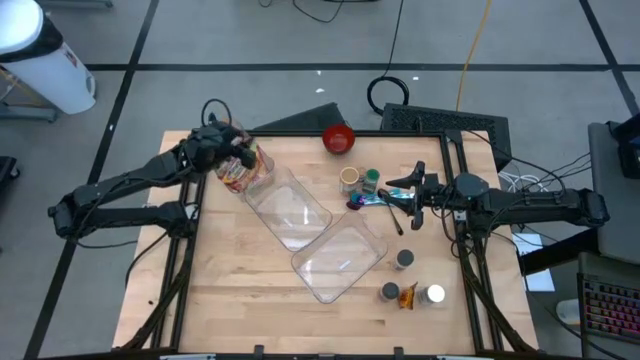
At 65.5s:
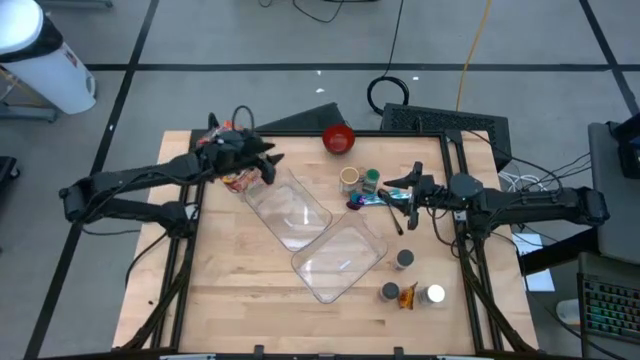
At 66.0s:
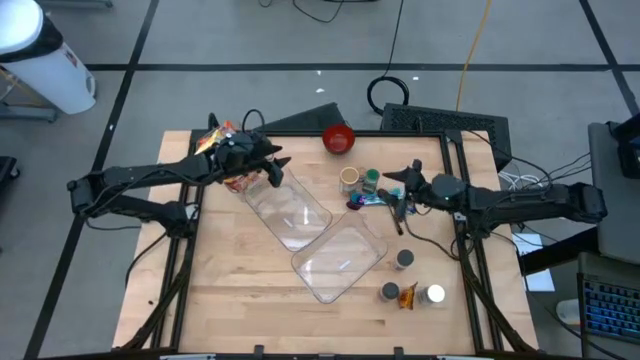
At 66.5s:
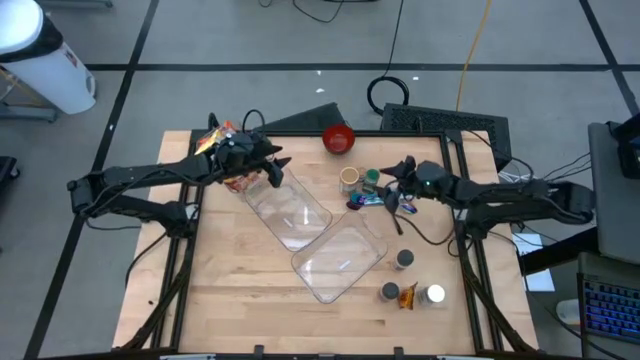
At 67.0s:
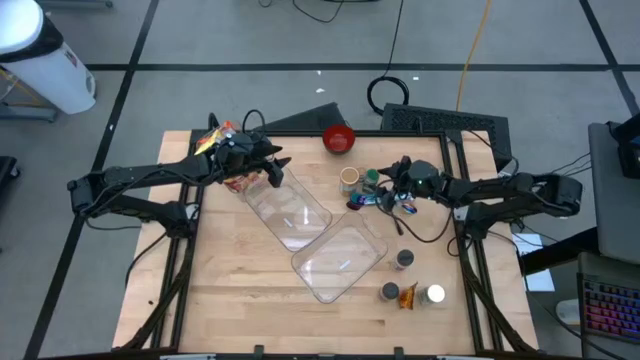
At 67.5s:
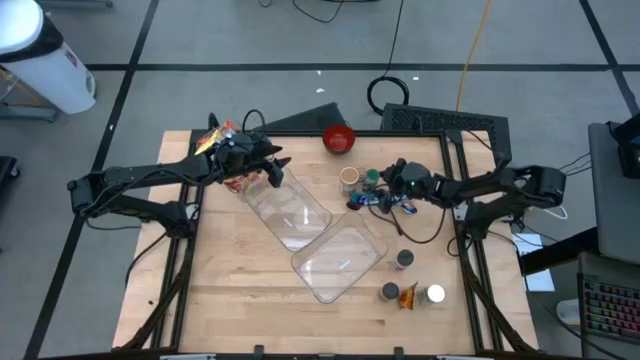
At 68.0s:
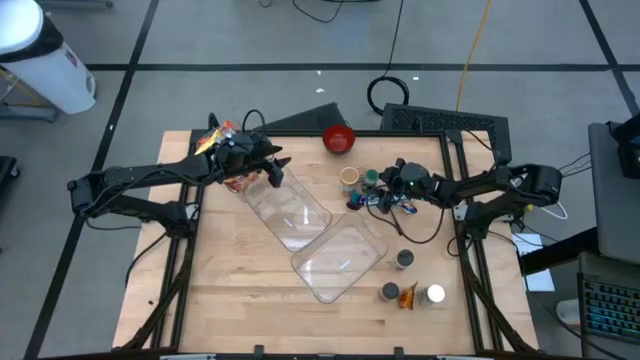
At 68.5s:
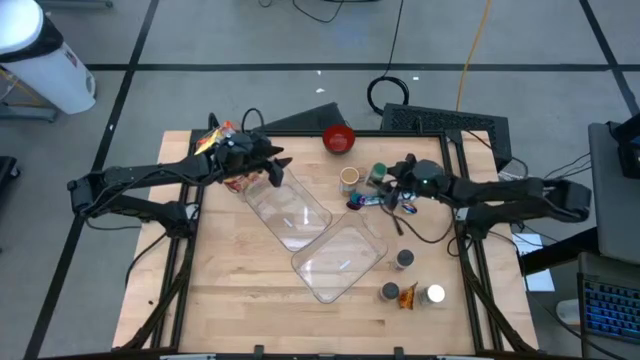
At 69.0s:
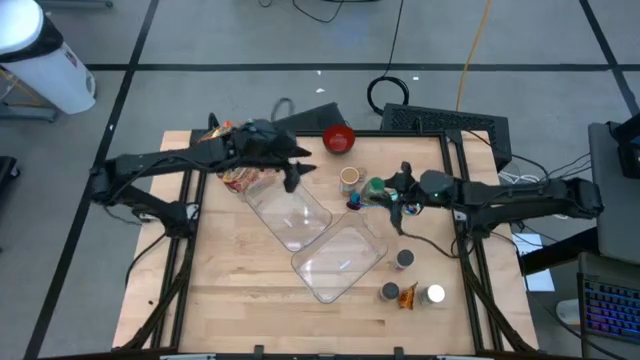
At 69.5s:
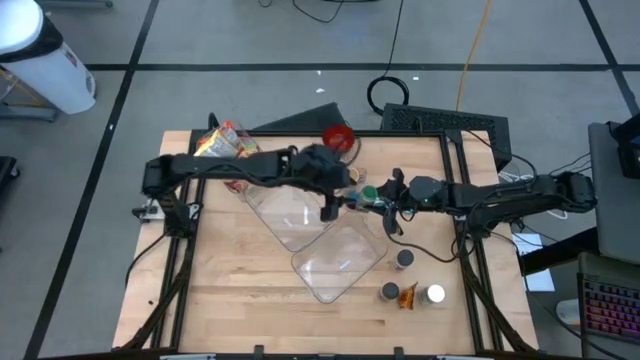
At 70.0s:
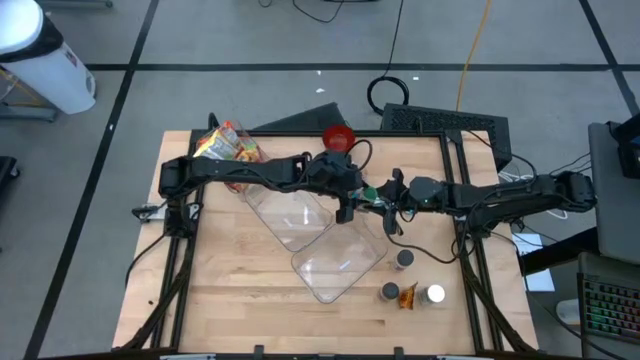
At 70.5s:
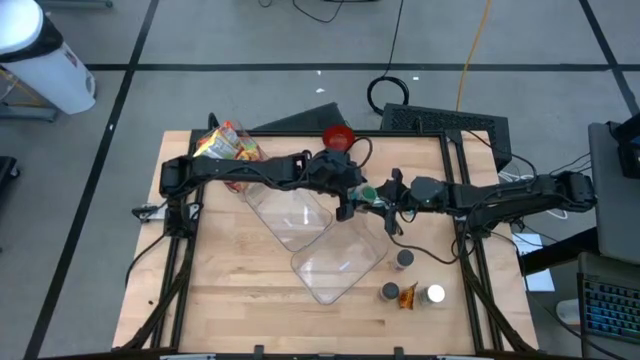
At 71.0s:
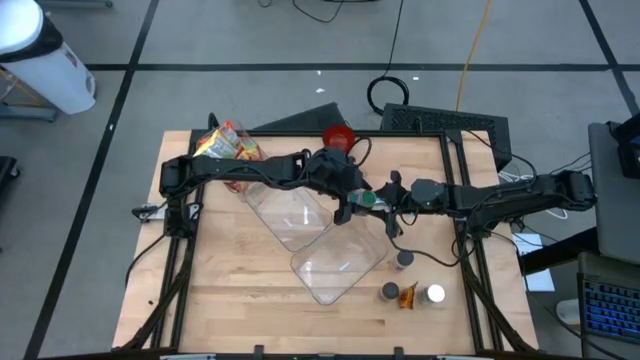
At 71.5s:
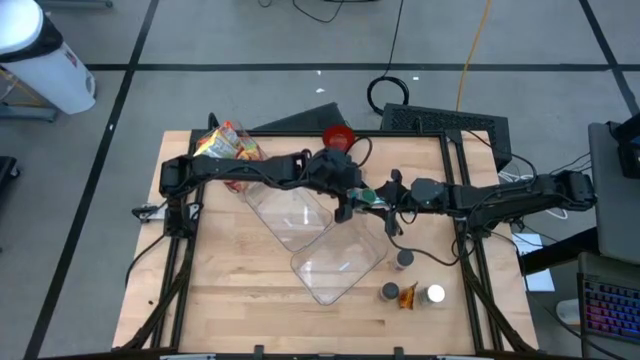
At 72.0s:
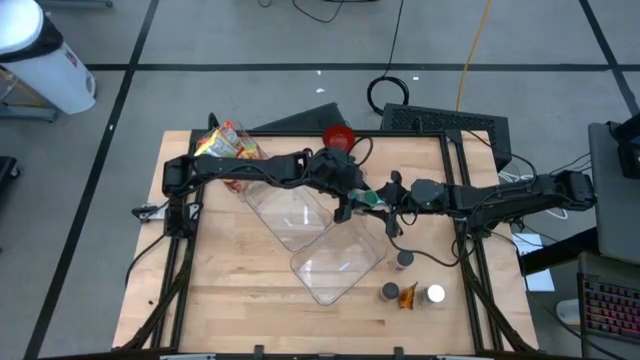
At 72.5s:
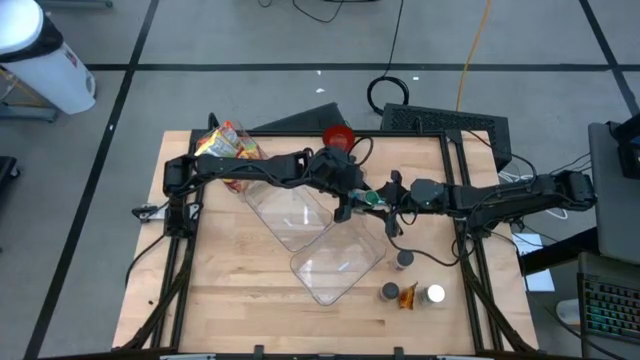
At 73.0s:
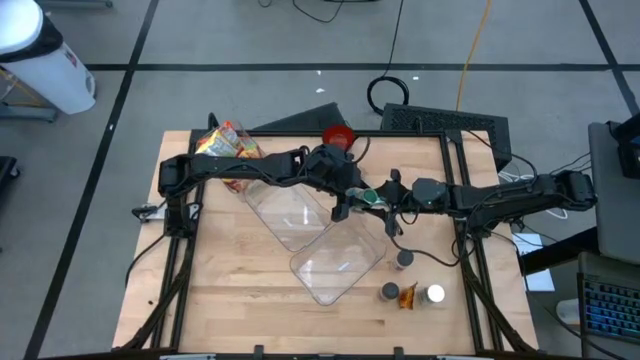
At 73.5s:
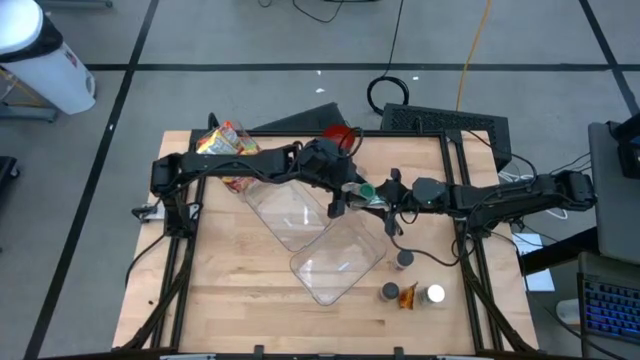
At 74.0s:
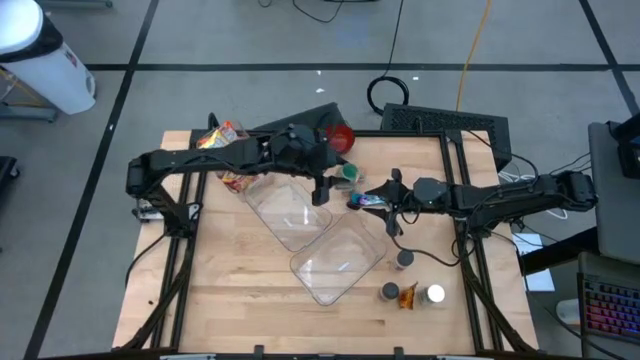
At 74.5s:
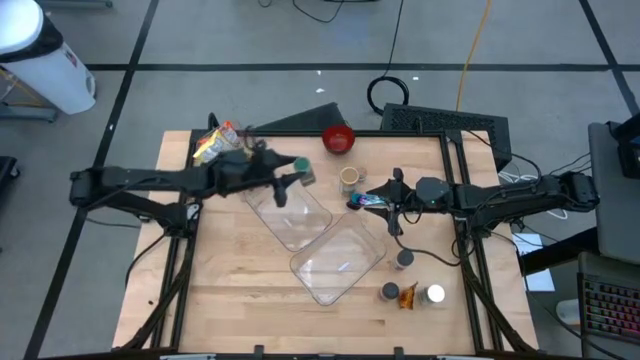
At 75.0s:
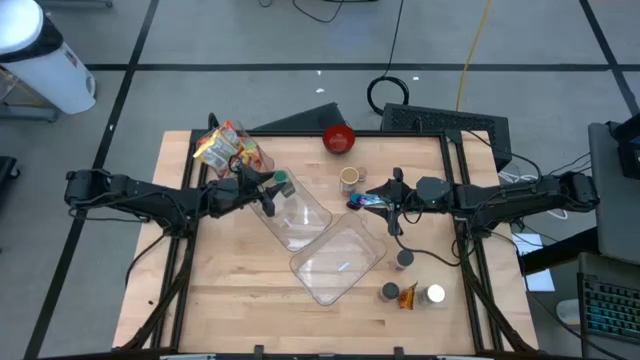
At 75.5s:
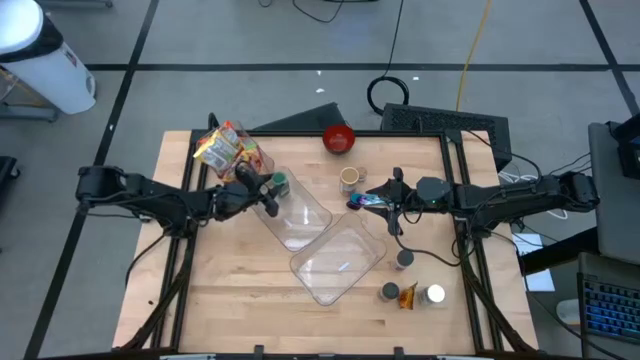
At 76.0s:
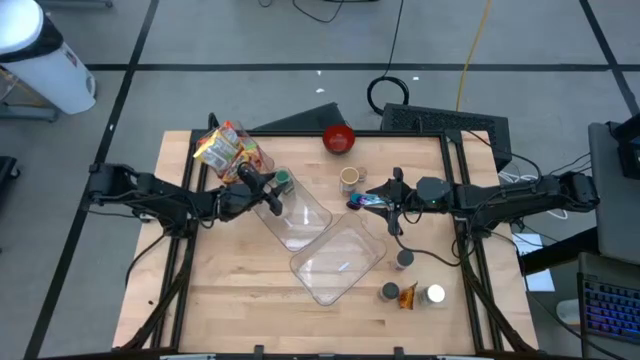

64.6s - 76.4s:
Task: Pick & Place Food Item
Put the green seasoning bottle into the middle transparent bin

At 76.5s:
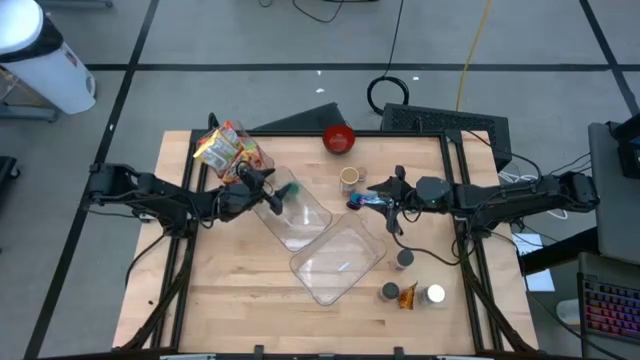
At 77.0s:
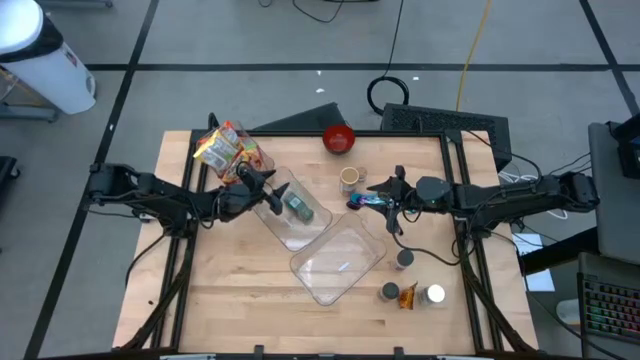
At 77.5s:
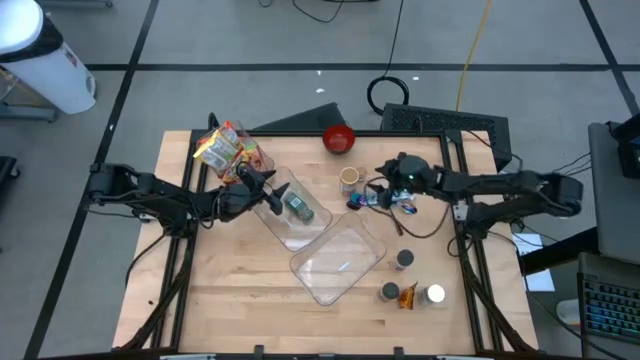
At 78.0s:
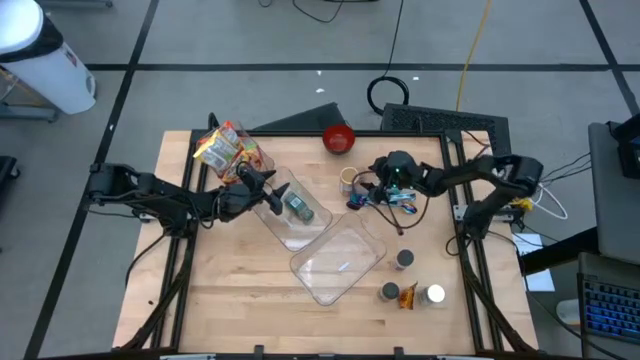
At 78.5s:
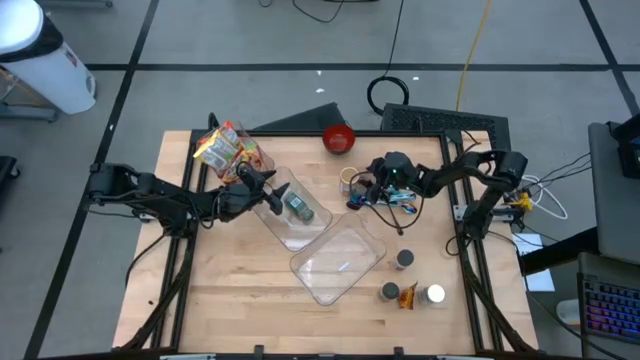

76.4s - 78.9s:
Put the brown seasoning bottle into the middle transparent bin

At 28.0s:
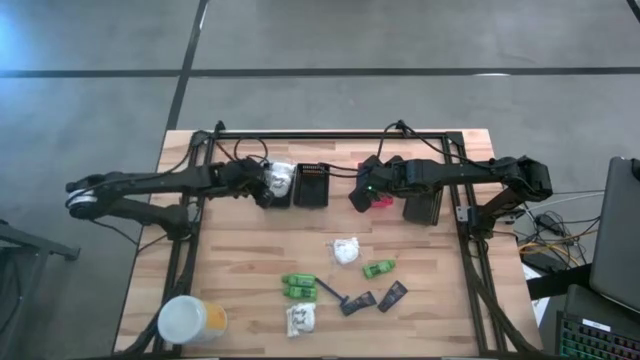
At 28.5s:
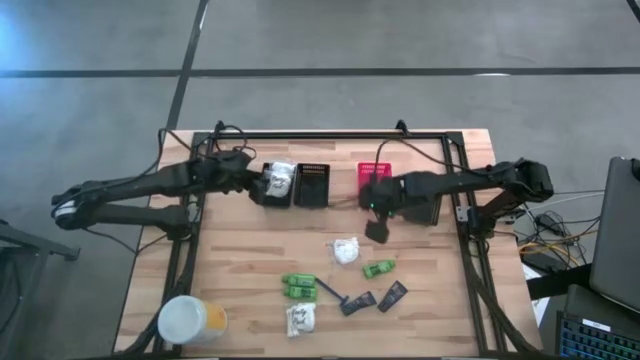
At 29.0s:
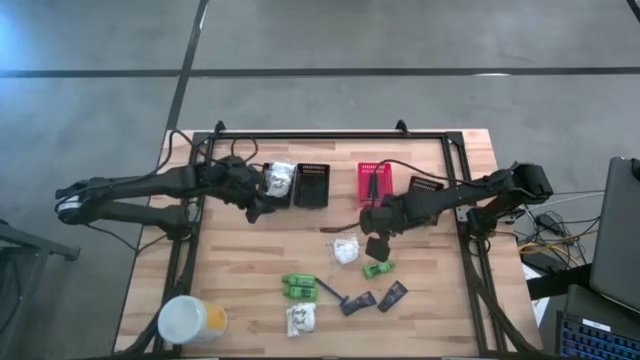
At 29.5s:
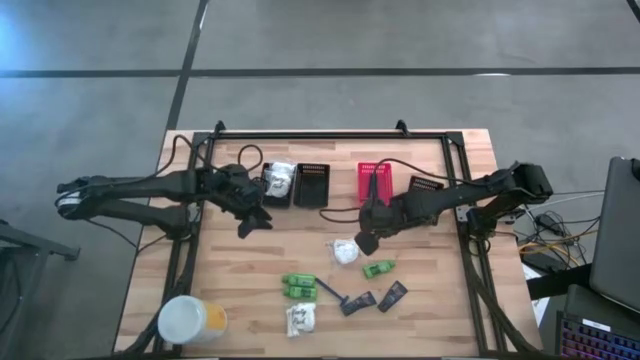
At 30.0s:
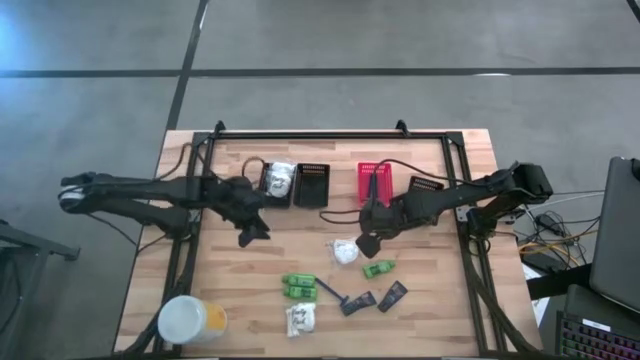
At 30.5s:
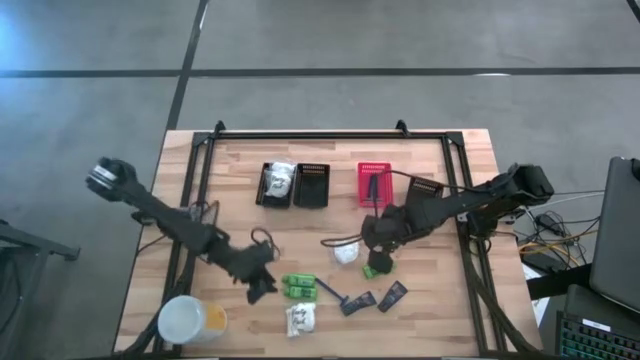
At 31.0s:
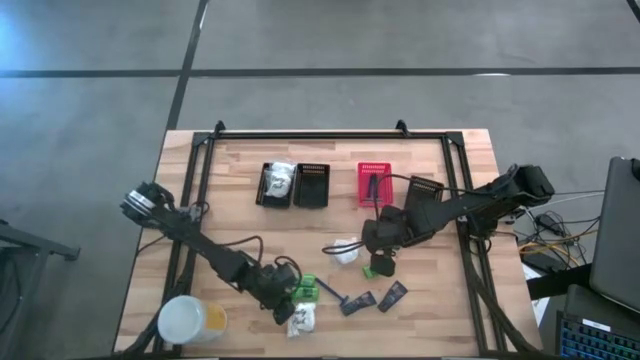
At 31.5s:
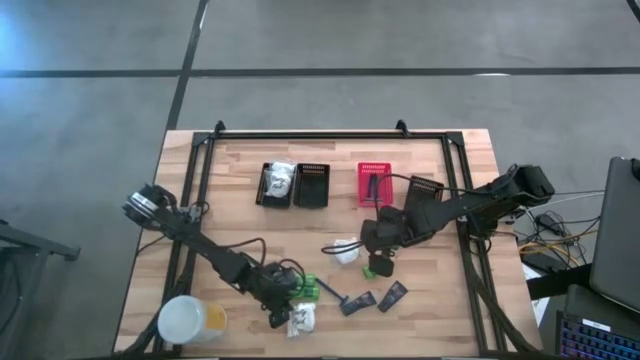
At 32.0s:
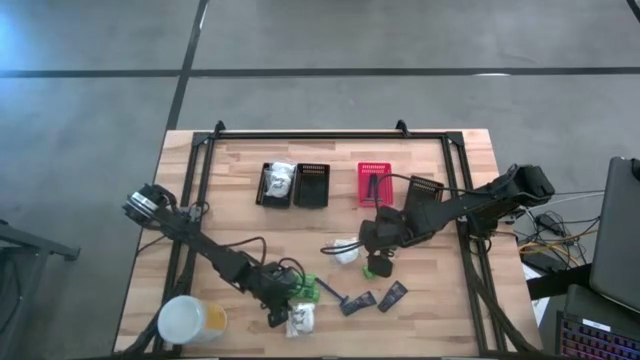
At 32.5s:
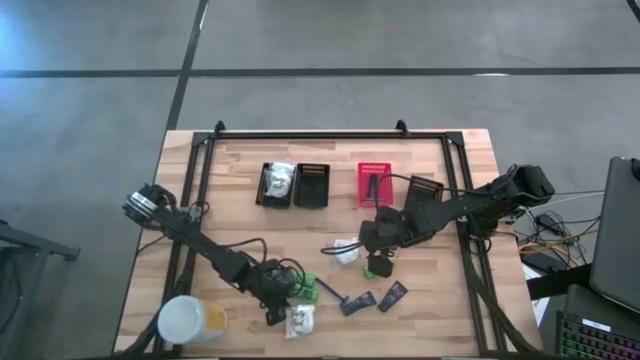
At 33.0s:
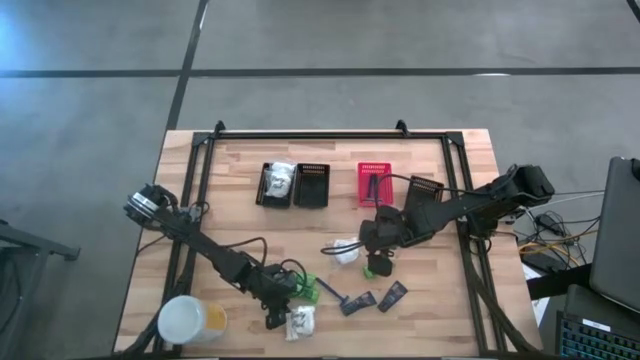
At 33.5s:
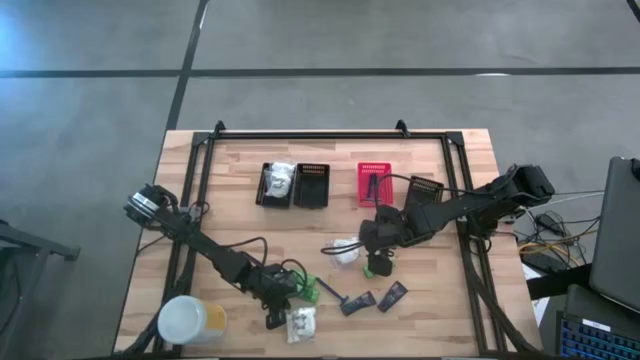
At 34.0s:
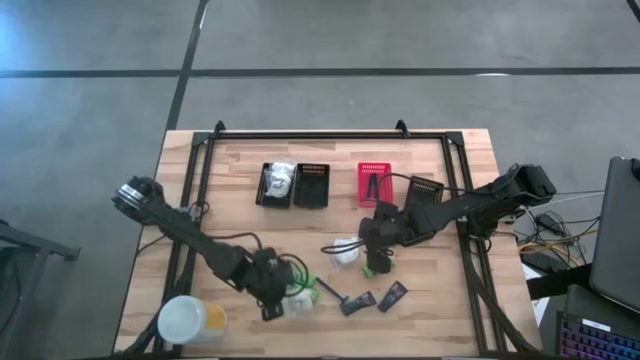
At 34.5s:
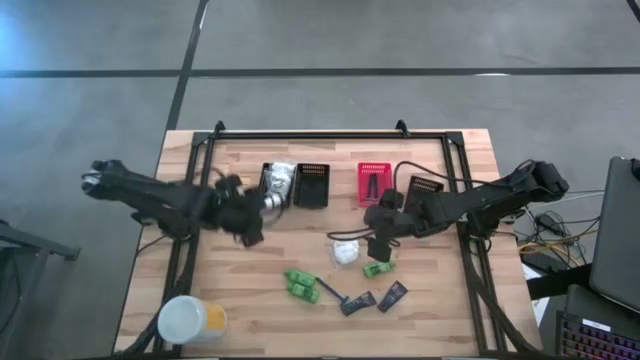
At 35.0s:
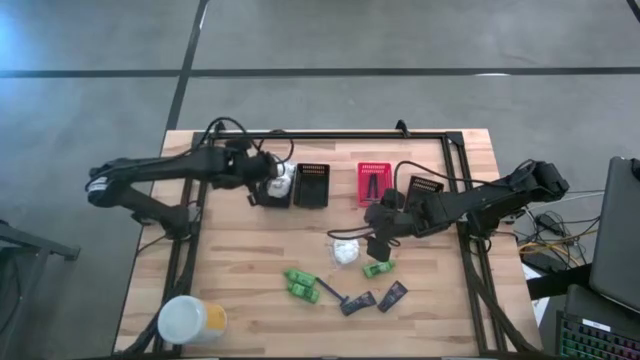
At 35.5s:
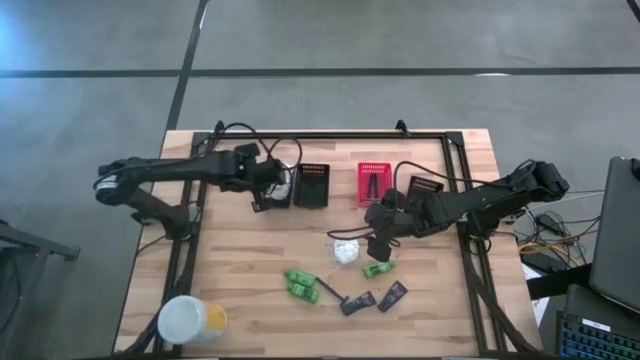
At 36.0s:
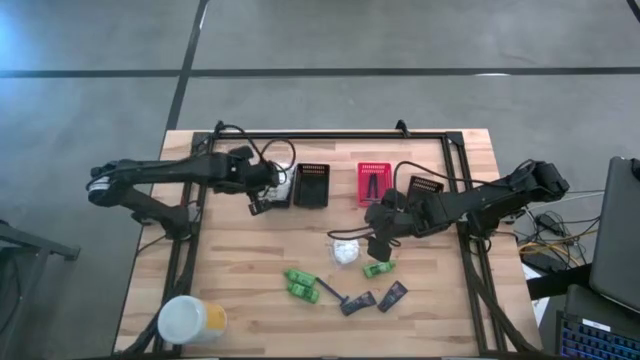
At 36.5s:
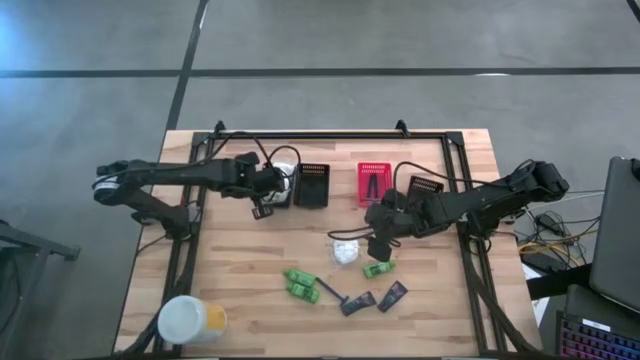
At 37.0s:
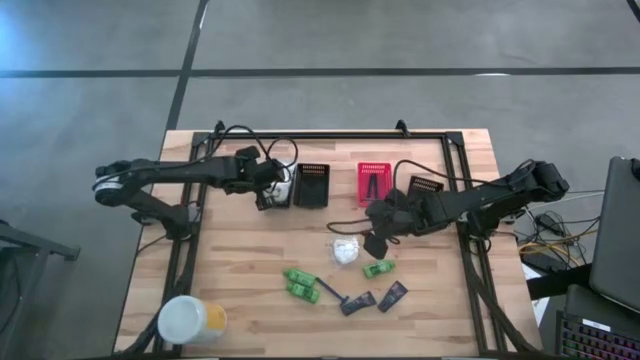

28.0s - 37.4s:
Task: Pick & Place Travel size toiletries
Put the white cotton pack into the left black bin
